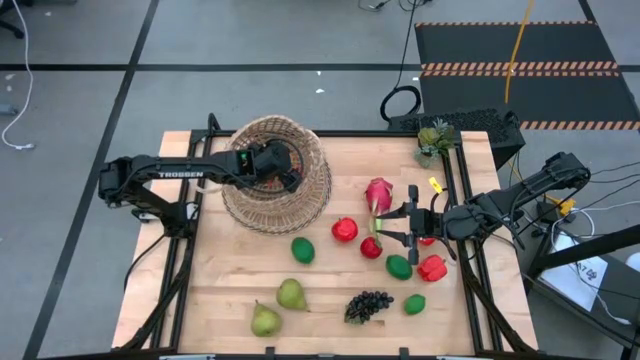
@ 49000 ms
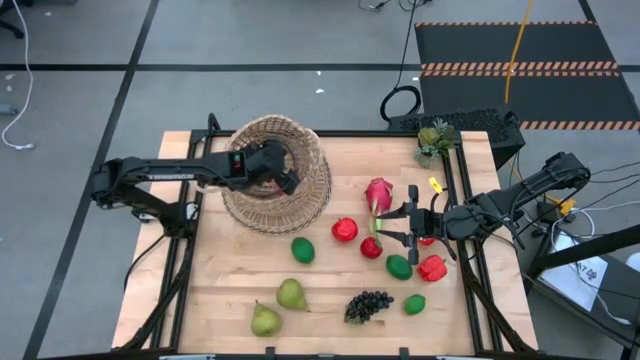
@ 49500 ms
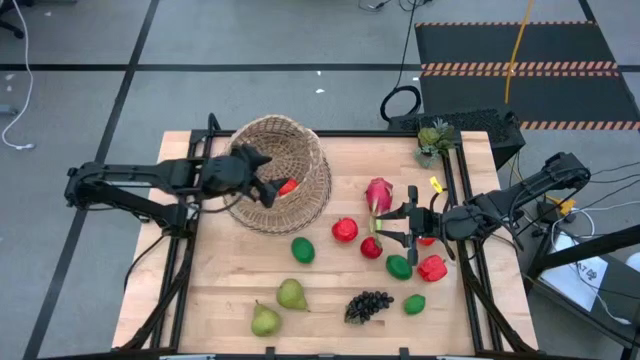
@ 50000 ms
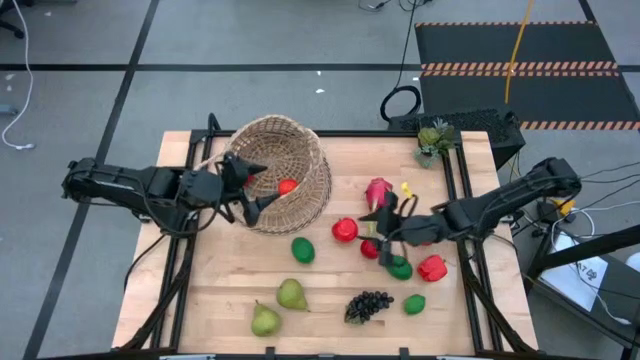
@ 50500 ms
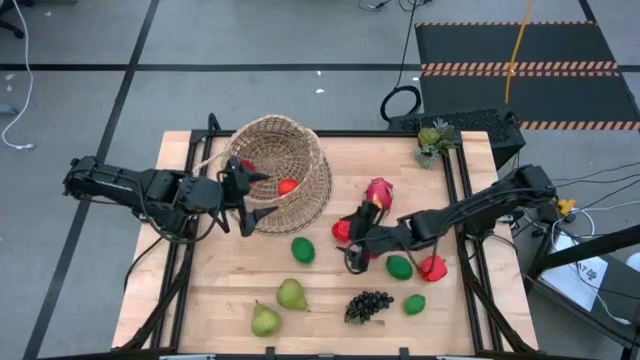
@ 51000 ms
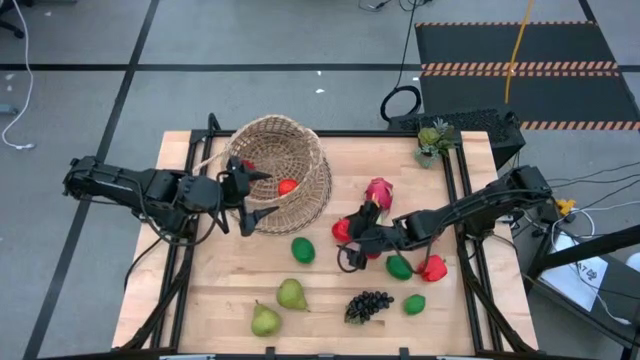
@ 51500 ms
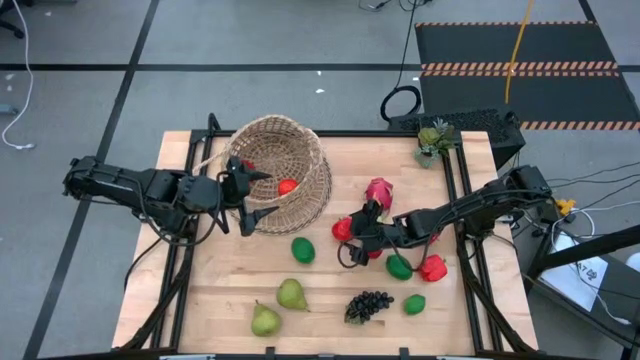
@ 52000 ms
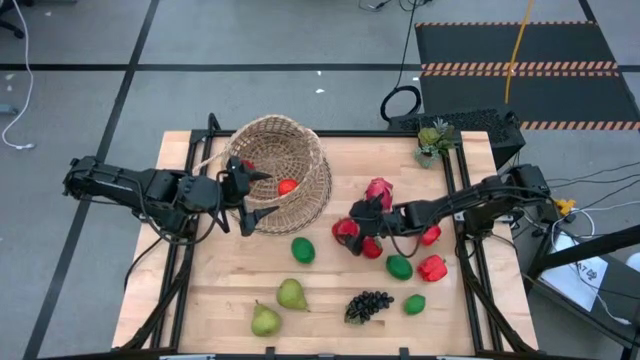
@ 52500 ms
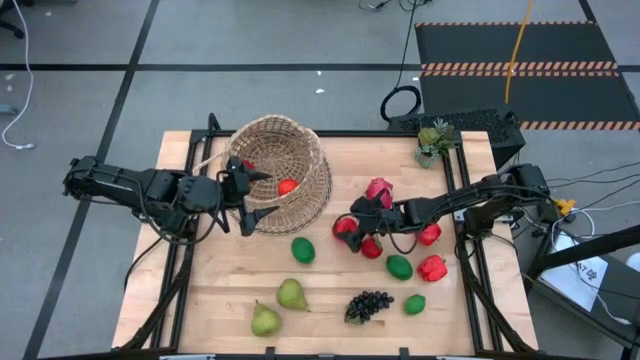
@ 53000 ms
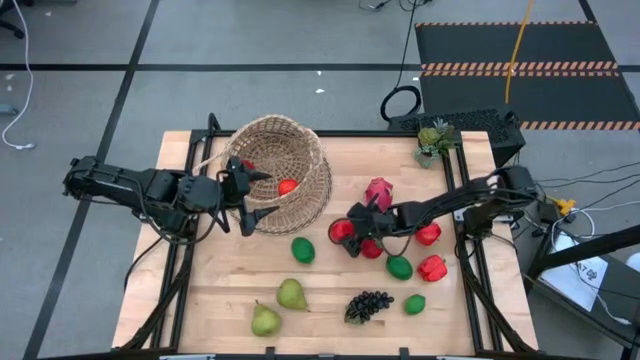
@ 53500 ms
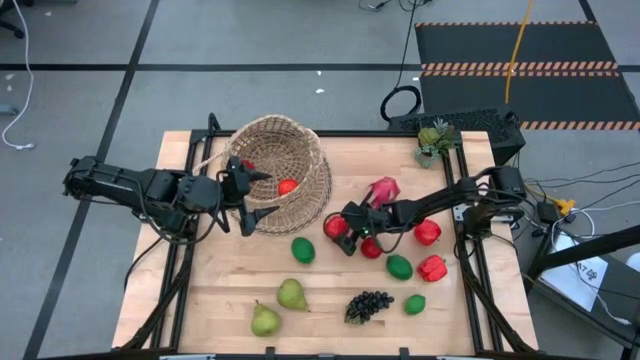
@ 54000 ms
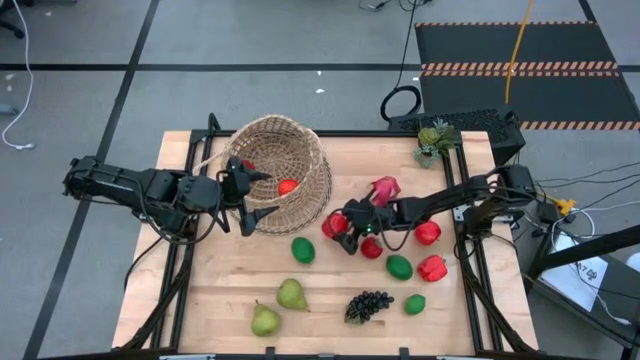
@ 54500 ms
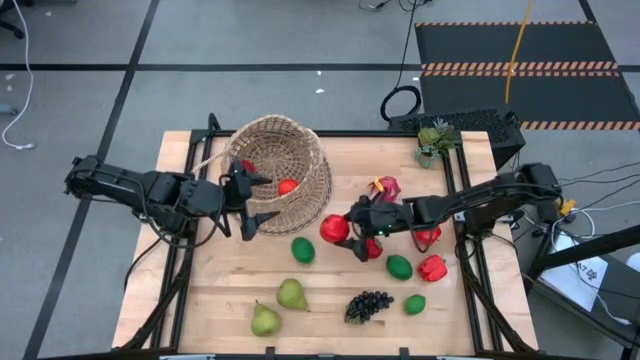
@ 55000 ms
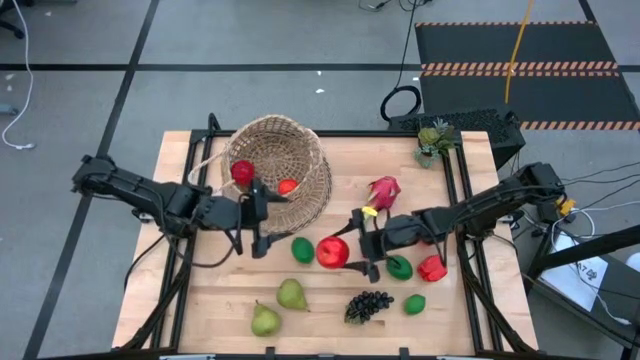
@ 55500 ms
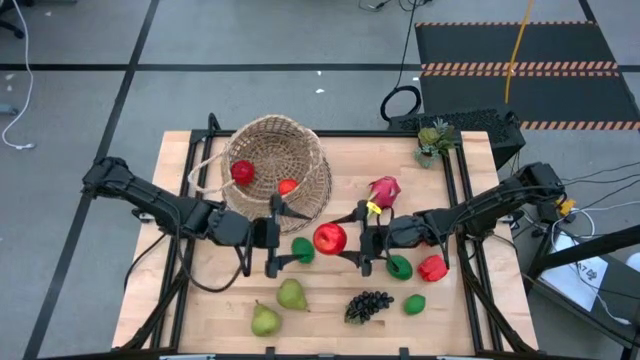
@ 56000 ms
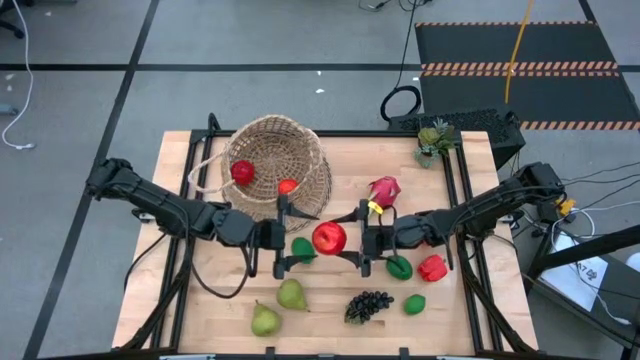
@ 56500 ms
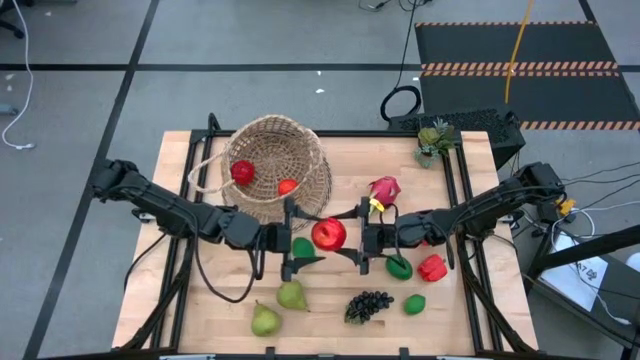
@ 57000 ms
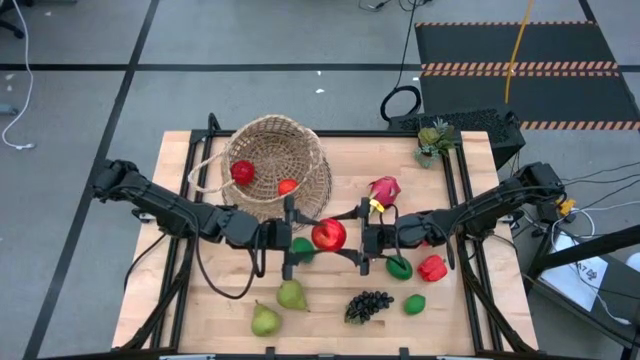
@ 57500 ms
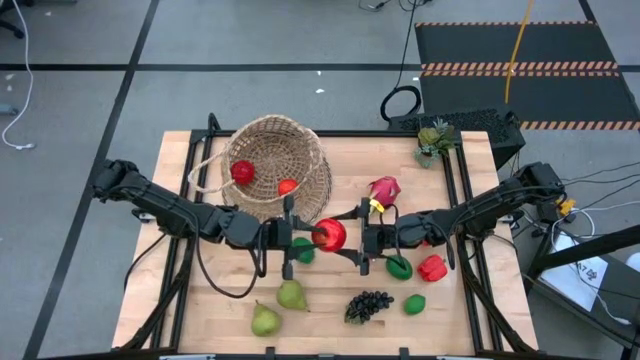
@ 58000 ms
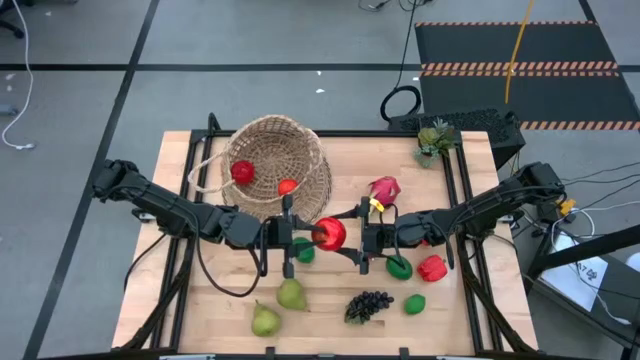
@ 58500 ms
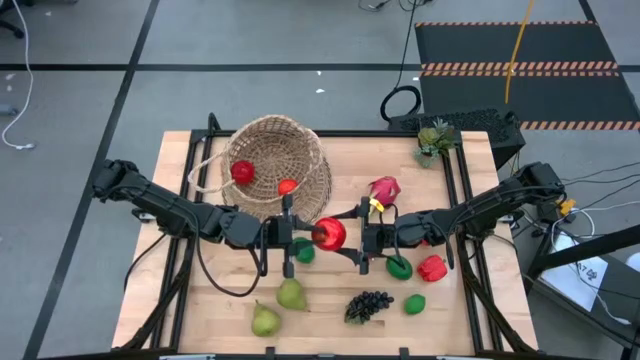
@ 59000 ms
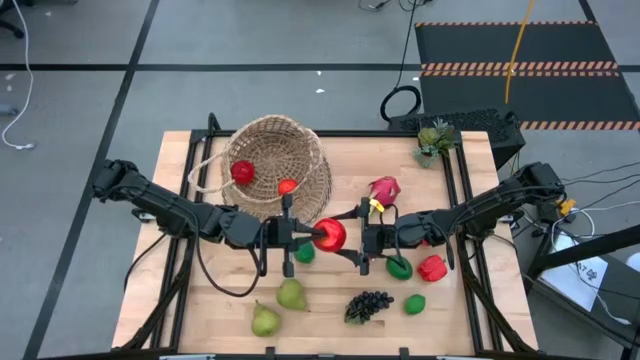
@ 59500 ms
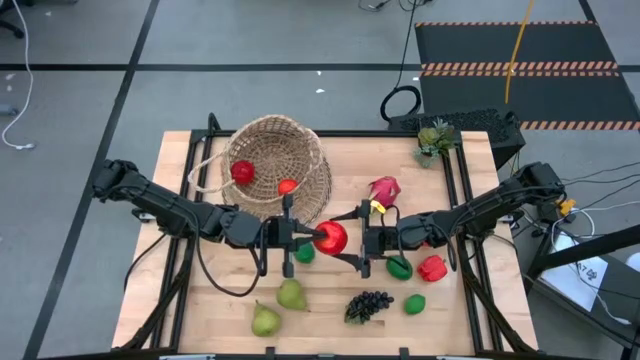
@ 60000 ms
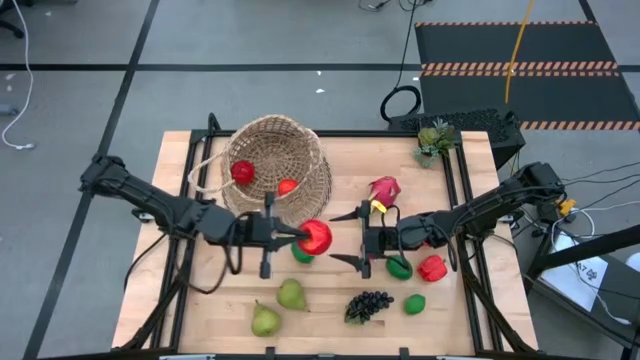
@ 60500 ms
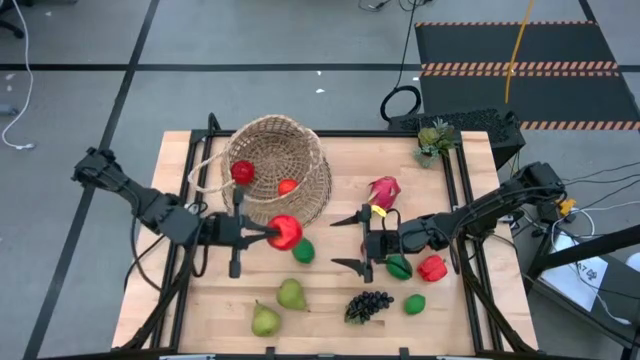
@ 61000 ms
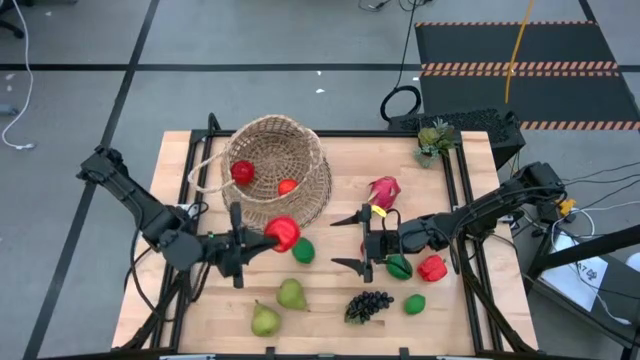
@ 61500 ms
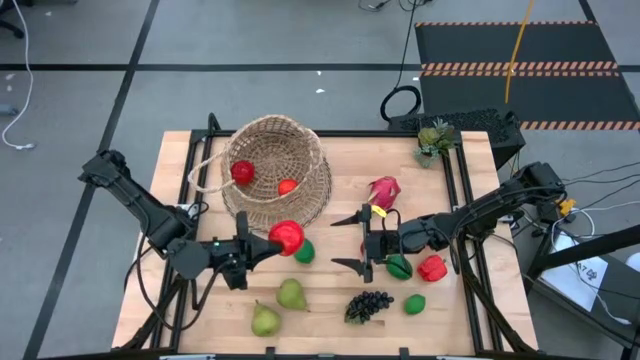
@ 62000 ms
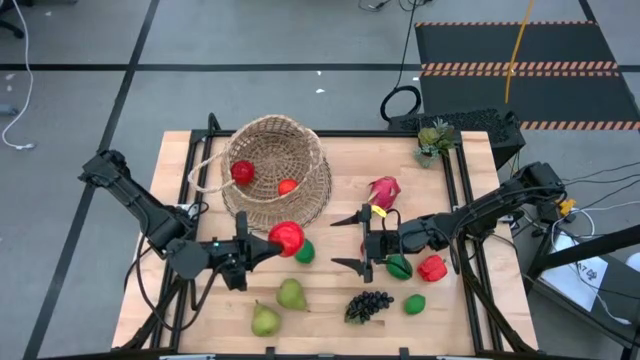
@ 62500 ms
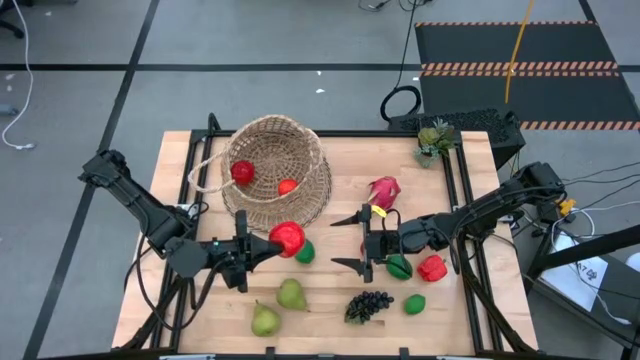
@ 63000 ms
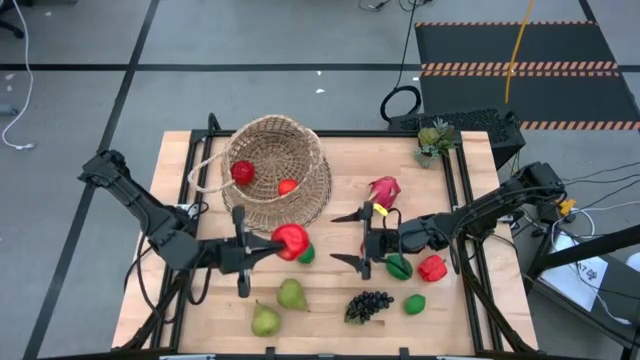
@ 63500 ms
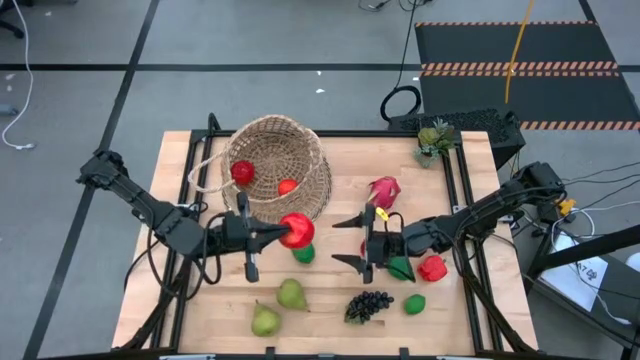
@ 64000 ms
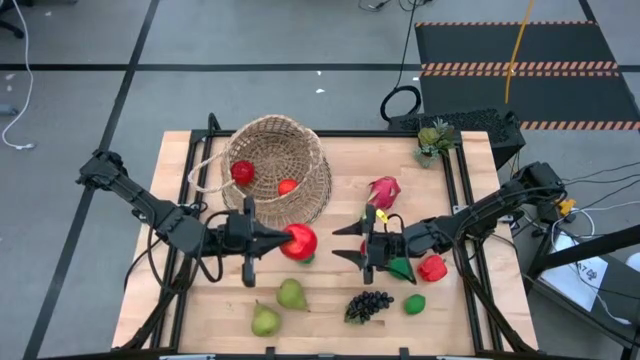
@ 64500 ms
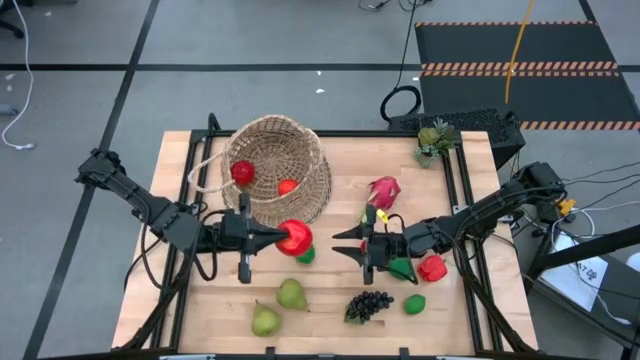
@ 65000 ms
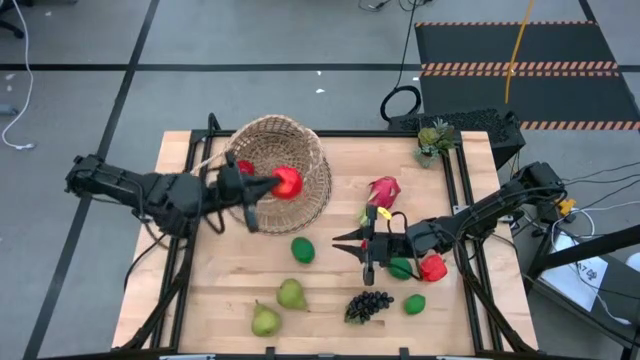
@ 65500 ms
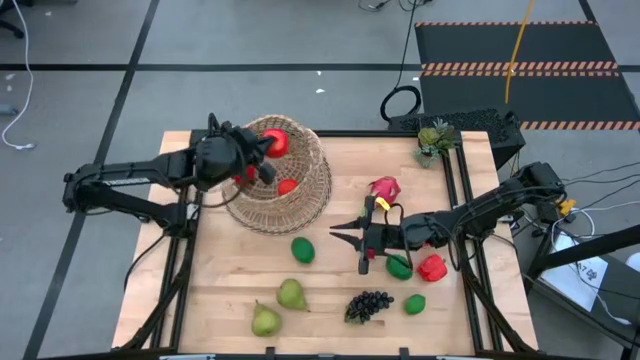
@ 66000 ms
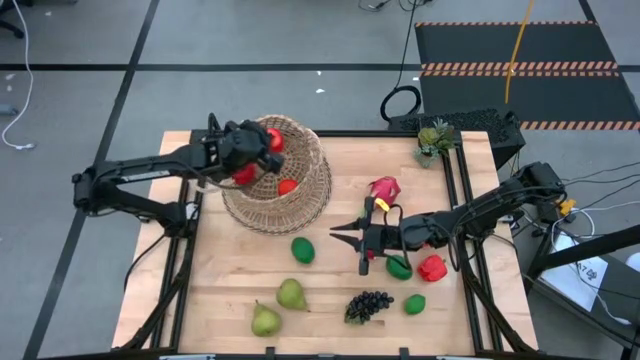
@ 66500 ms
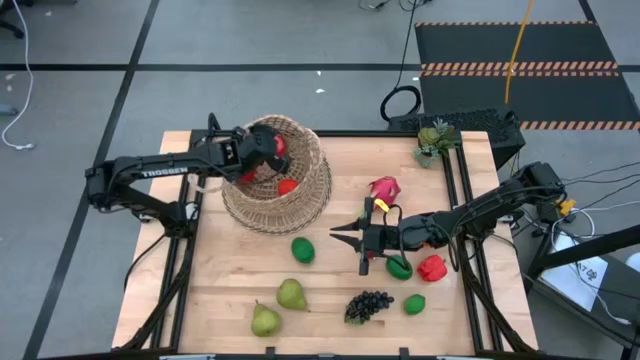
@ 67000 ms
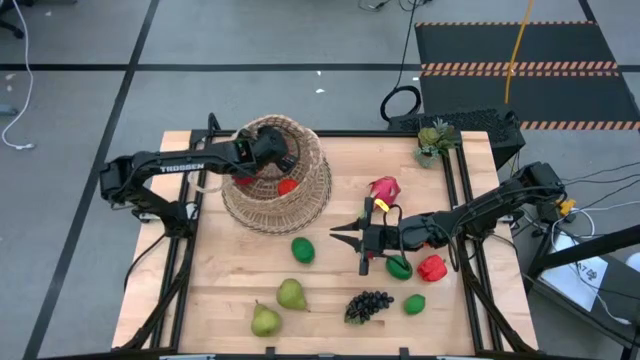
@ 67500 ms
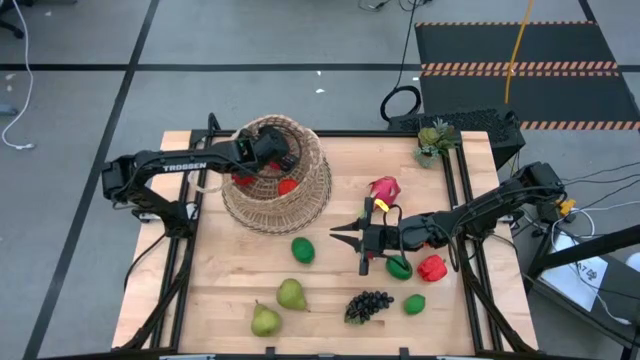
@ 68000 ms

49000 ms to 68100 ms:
Task: Build produce basket
Put the apple into the basket
